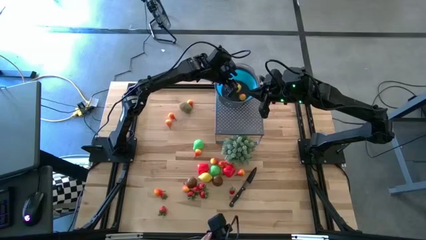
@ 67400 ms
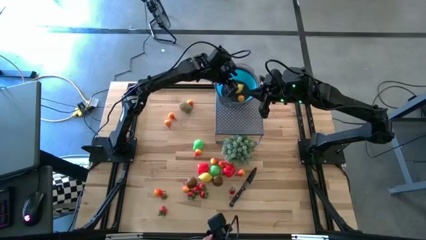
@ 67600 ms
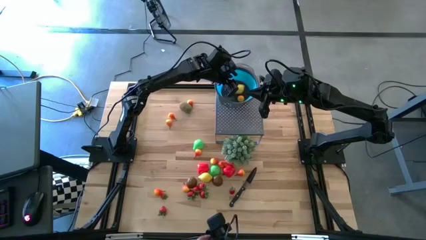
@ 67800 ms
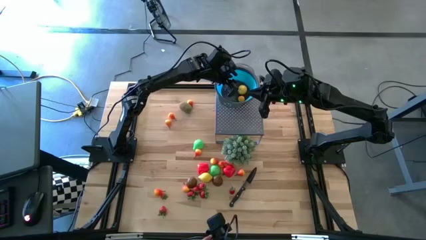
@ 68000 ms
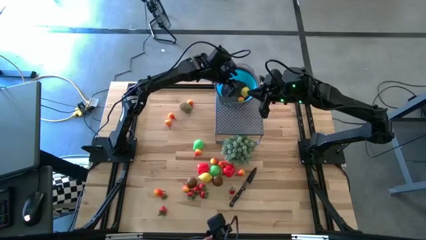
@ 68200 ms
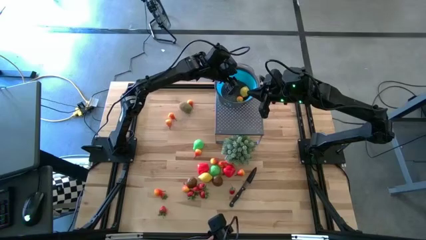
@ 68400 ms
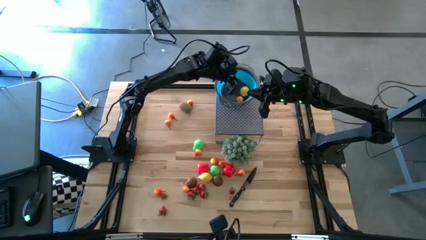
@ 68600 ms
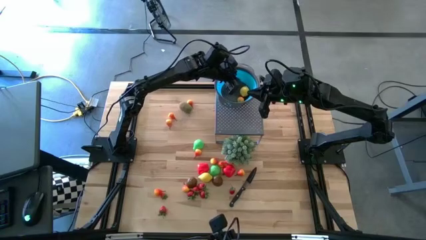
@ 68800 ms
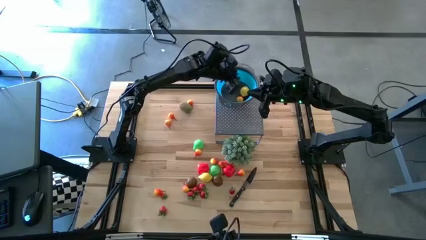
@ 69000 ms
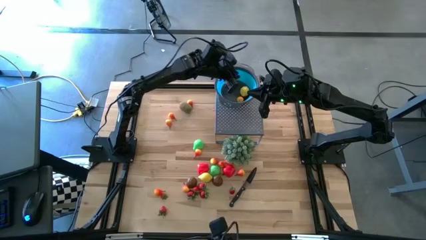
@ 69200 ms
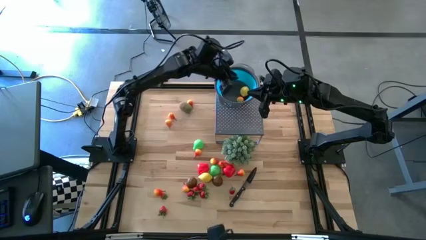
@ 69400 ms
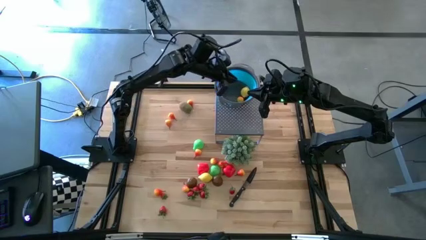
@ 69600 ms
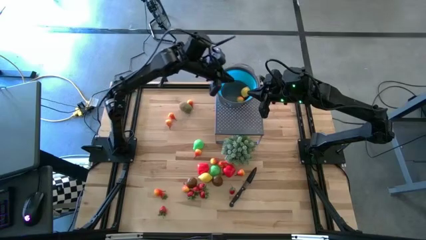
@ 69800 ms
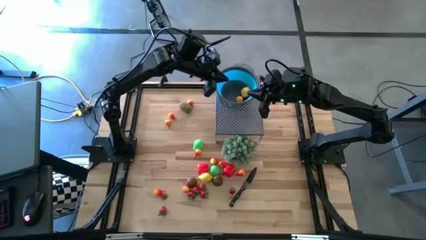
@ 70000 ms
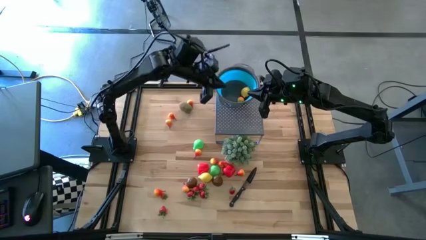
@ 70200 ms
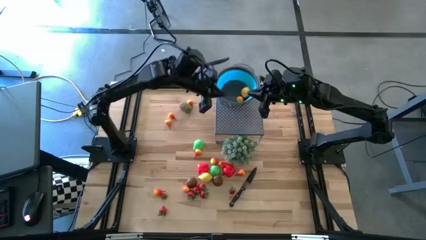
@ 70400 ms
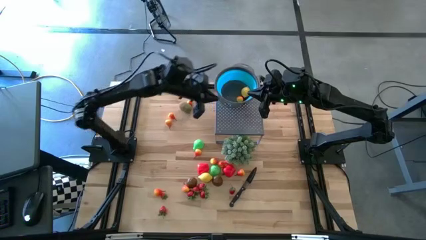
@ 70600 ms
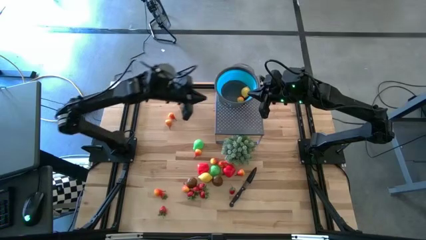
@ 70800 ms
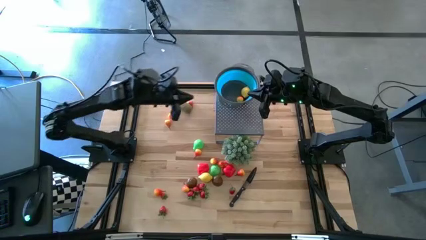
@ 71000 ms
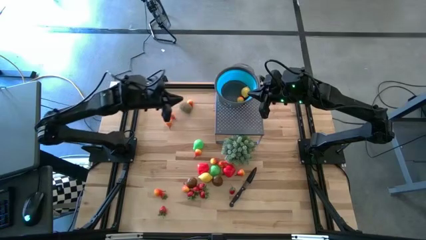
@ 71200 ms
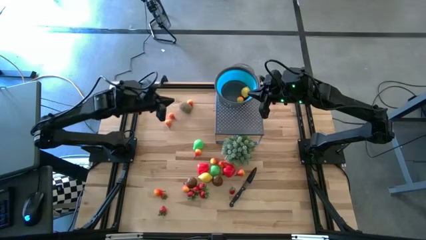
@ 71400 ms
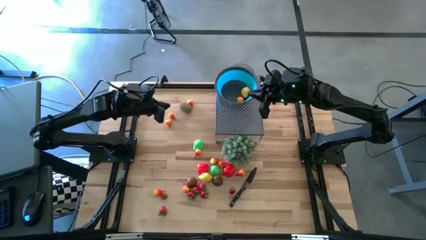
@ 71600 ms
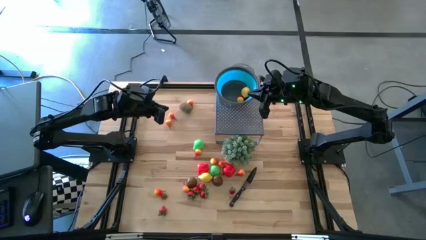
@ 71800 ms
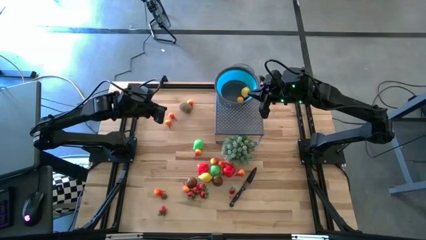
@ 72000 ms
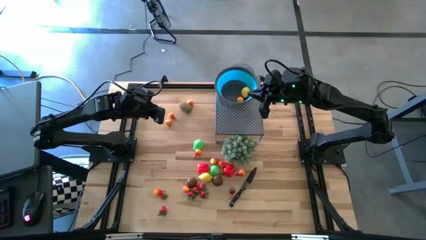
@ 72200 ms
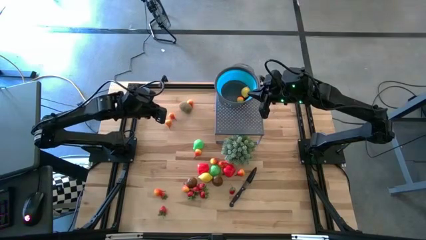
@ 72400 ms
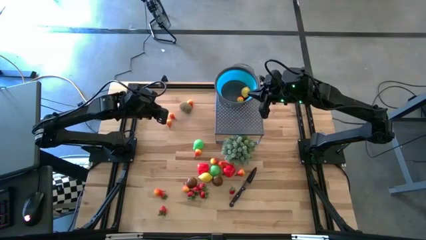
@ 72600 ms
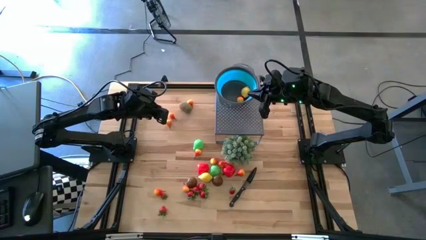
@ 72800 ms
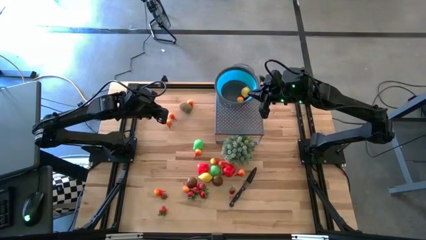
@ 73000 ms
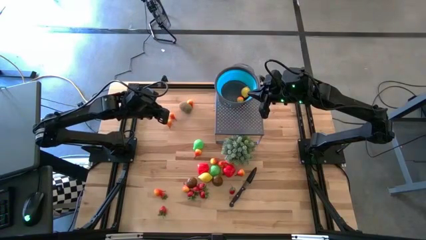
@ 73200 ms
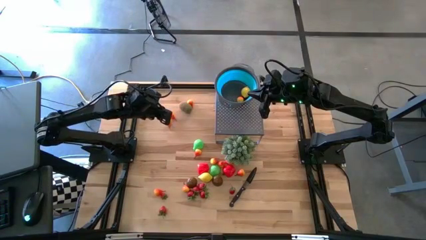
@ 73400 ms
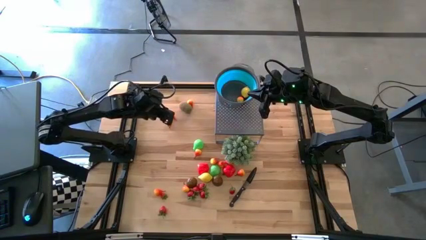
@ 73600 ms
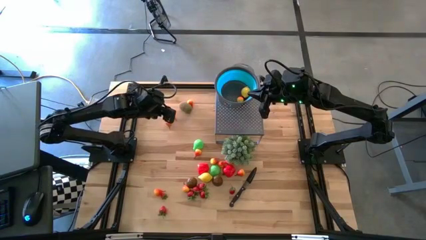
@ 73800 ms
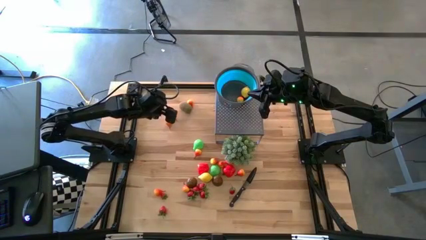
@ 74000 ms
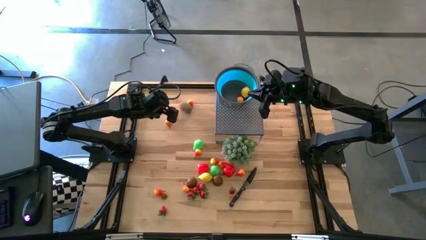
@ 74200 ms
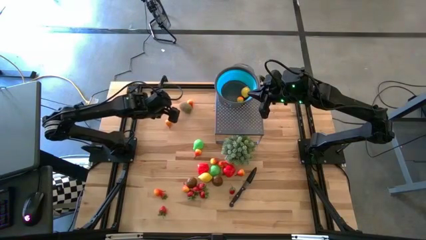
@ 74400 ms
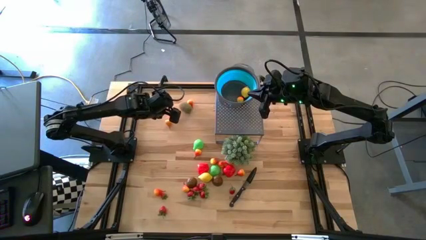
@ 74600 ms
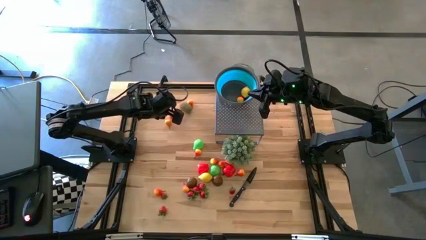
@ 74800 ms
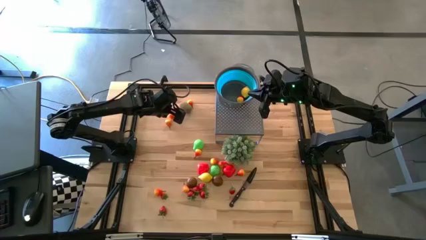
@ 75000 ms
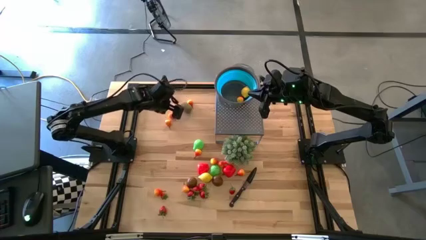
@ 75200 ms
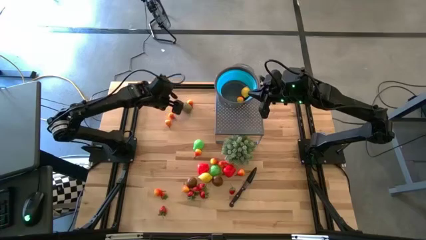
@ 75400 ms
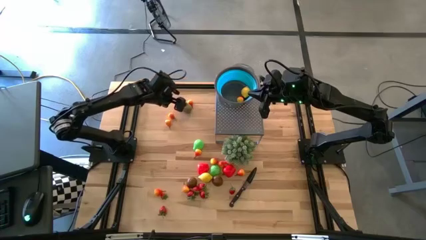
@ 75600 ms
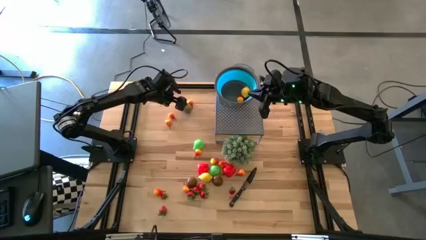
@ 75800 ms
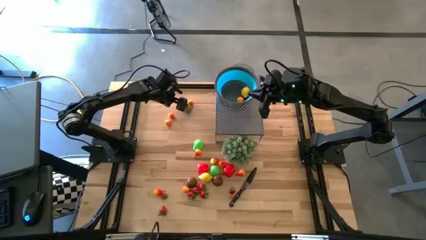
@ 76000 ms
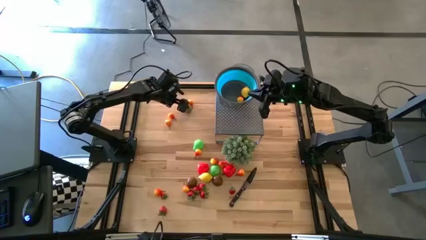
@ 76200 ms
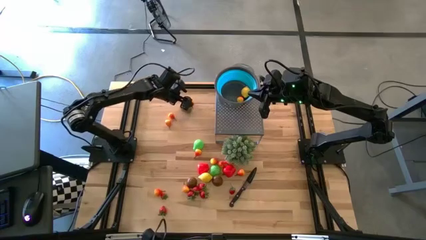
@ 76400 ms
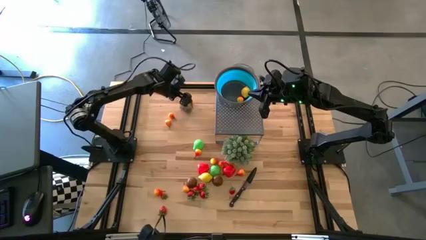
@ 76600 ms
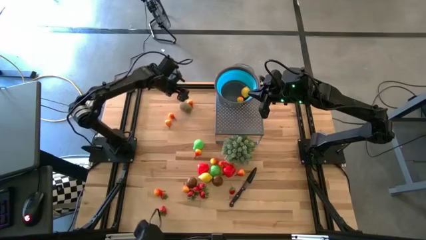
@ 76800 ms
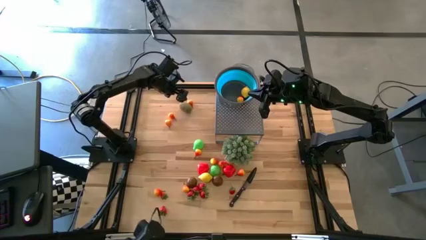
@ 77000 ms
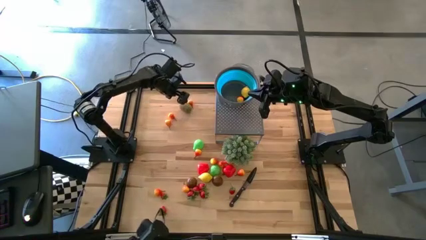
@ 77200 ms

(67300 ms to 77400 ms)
Task: Pick & Place Fruit
Put the brown kiwi into the blue strainer bowl

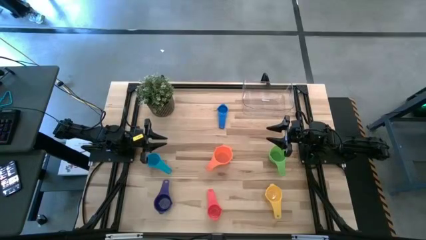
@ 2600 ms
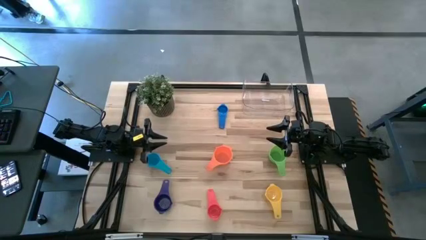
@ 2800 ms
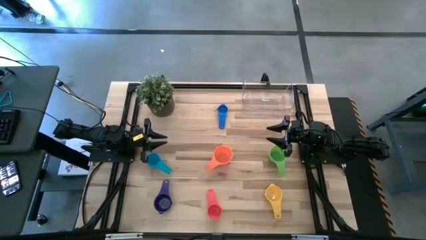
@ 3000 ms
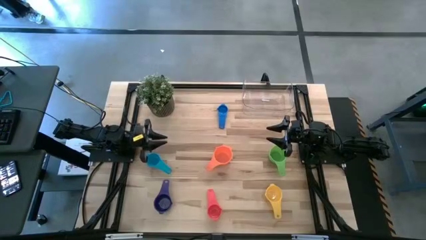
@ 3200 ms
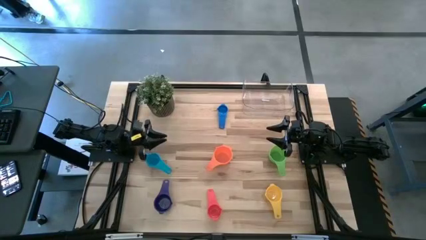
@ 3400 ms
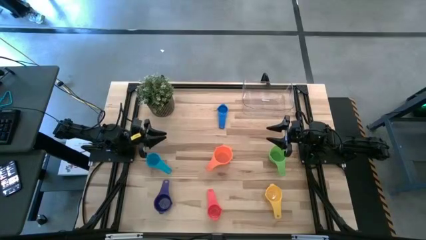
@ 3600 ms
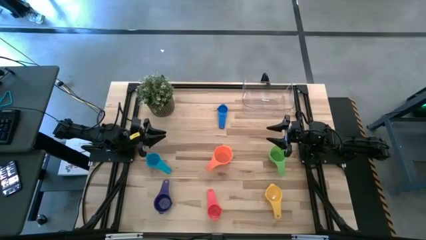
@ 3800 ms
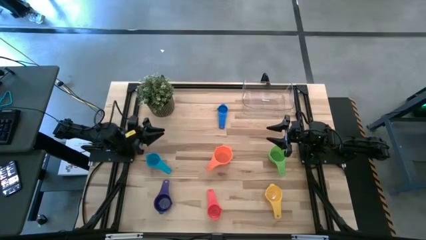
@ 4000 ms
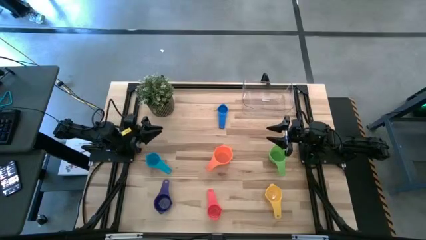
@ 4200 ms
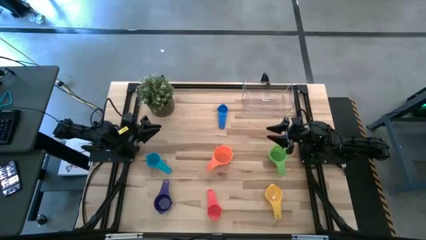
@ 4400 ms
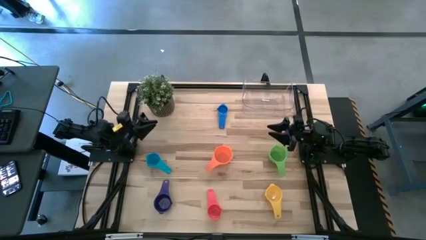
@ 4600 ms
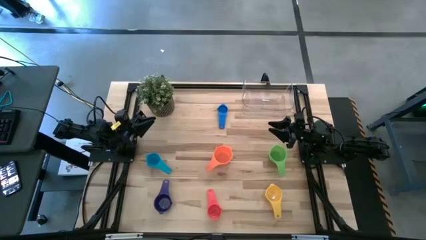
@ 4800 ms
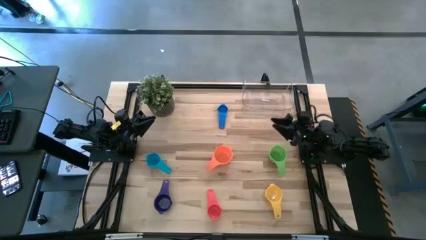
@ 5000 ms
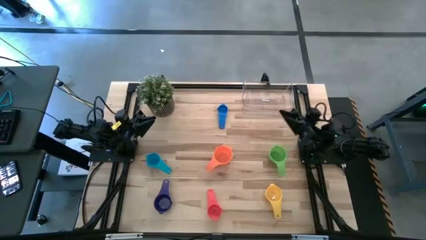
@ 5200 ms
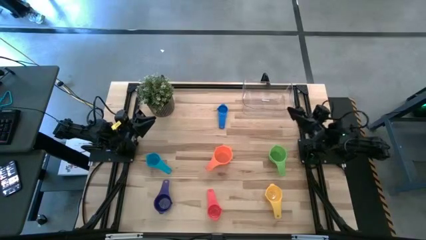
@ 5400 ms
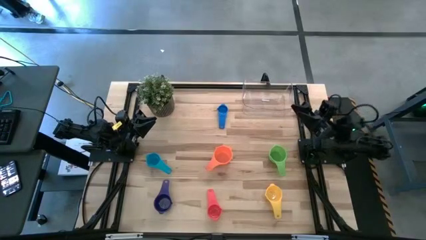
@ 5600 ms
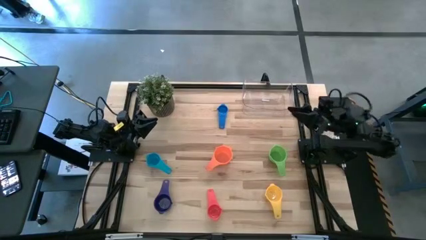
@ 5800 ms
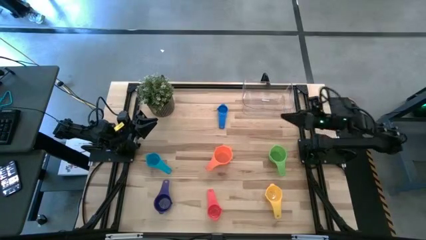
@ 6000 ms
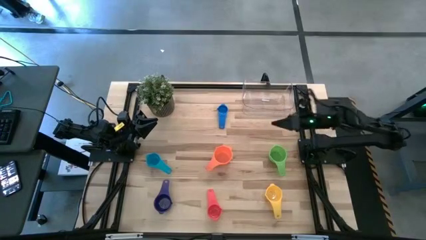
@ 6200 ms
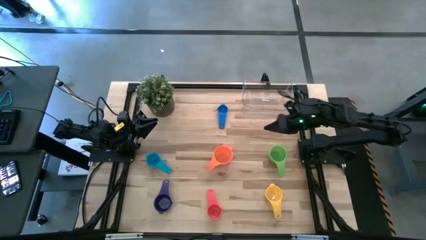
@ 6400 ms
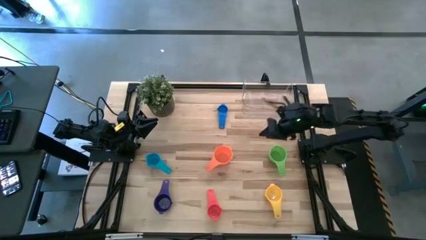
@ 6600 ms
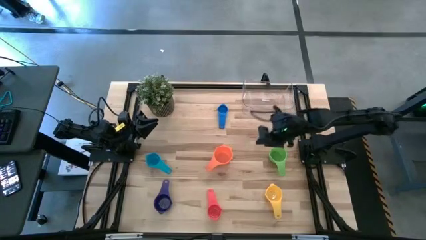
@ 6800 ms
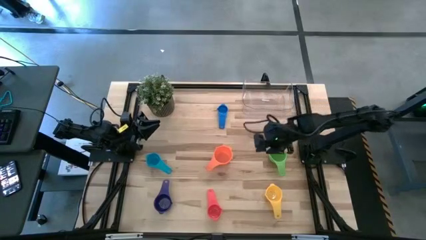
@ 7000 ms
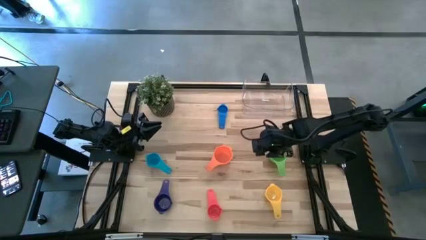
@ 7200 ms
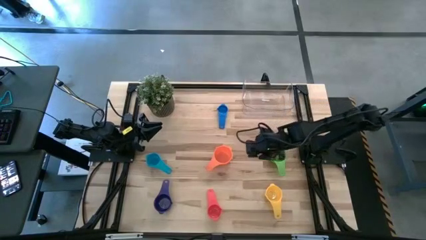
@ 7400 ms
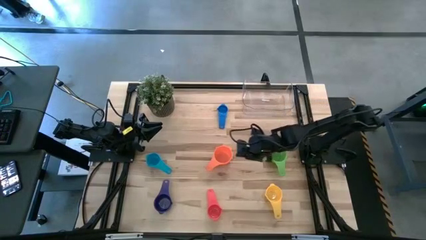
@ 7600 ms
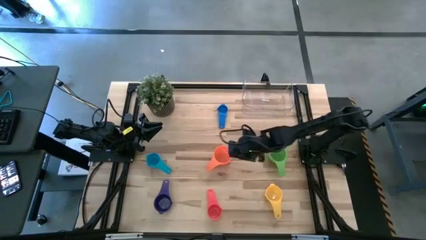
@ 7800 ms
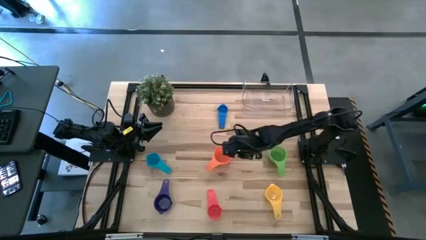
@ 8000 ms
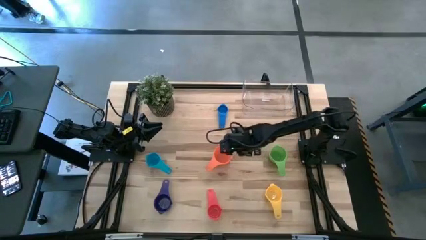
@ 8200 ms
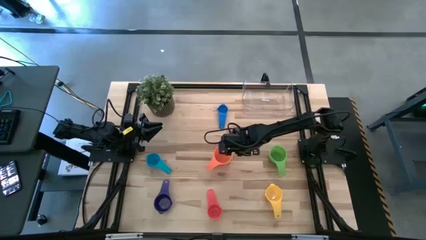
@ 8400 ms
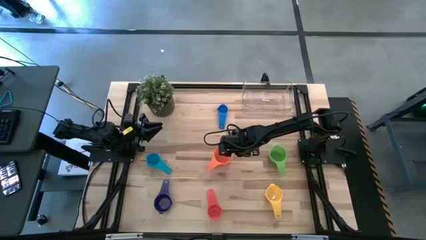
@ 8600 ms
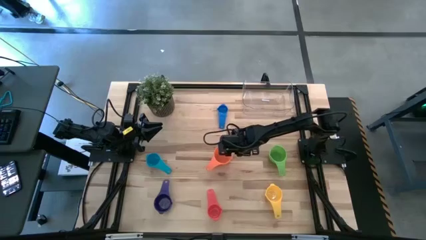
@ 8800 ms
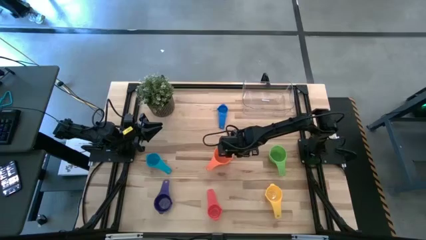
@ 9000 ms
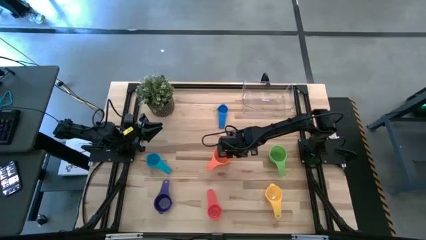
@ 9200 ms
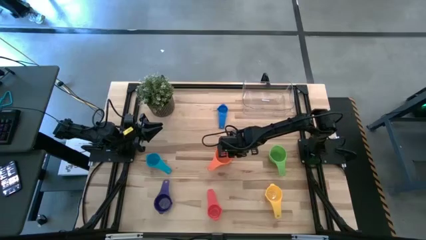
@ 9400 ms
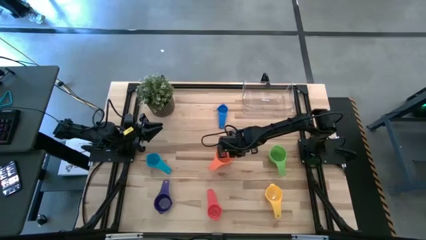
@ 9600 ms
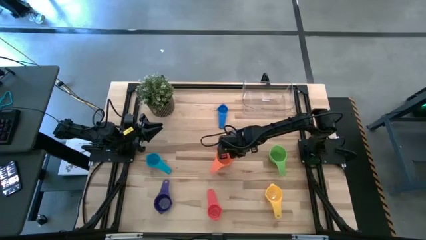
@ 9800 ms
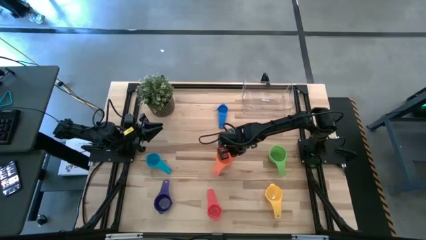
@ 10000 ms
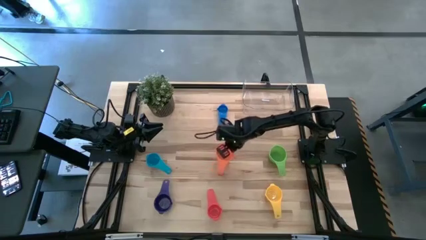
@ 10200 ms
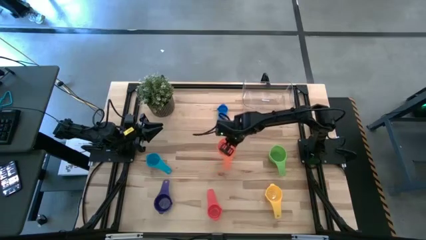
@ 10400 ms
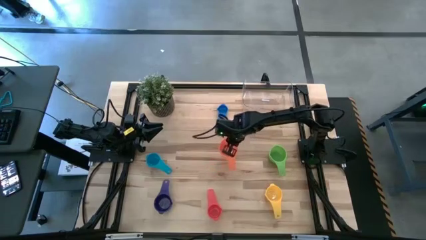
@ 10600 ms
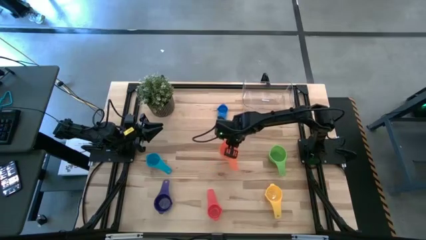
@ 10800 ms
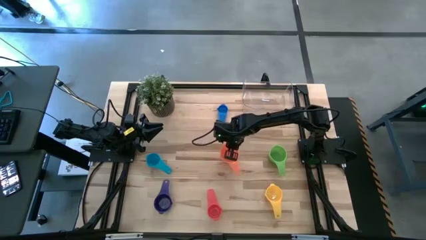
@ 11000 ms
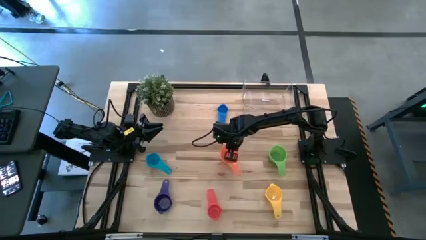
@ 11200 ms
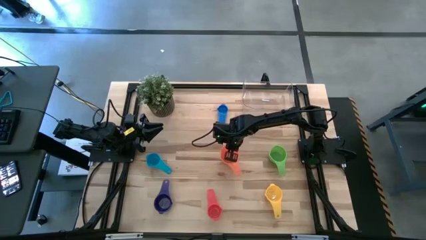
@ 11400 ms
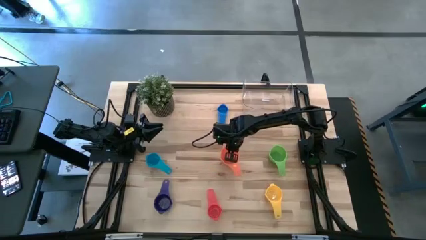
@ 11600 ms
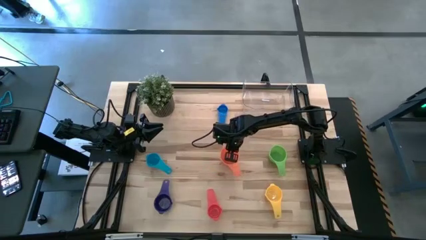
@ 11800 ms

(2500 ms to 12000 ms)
Task: Nest measuring cups in basket
Prepare the orange measuring cup
